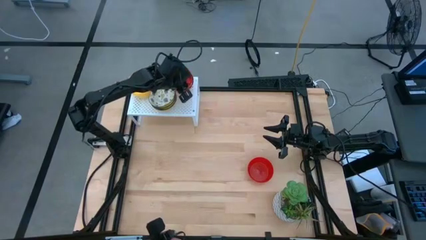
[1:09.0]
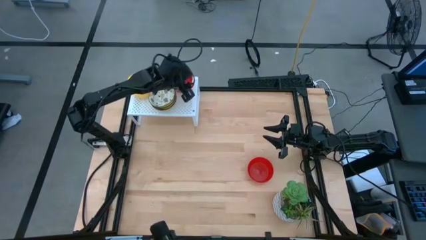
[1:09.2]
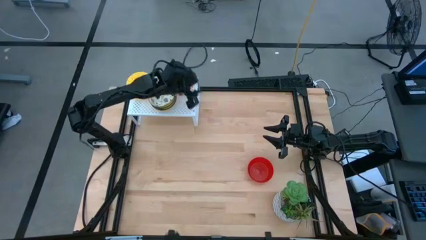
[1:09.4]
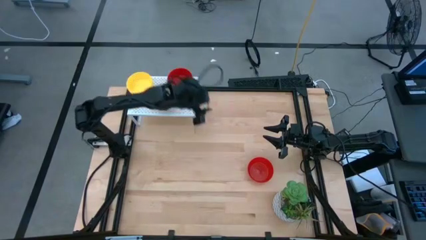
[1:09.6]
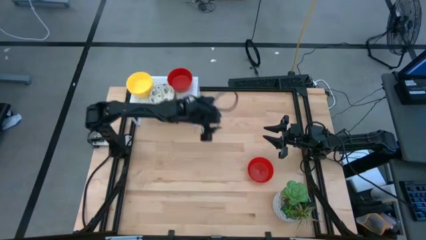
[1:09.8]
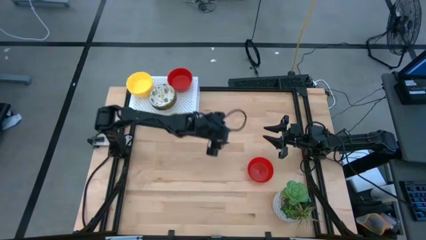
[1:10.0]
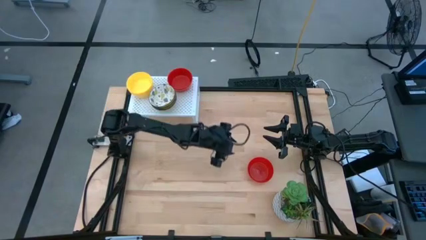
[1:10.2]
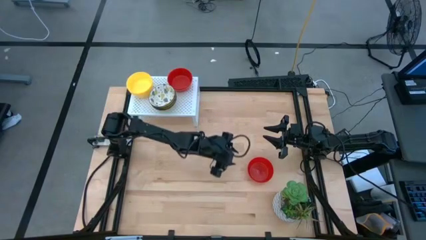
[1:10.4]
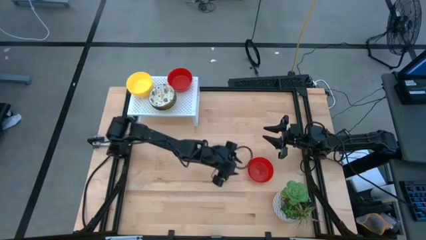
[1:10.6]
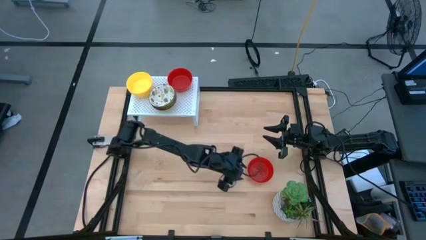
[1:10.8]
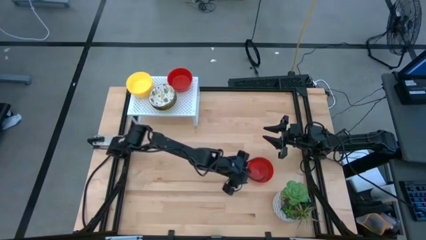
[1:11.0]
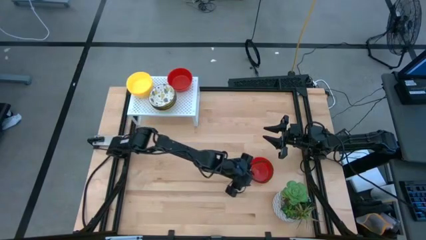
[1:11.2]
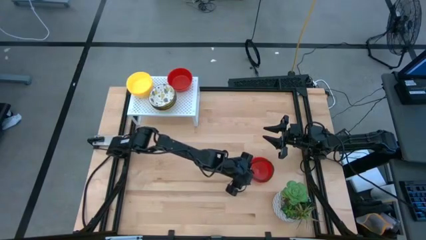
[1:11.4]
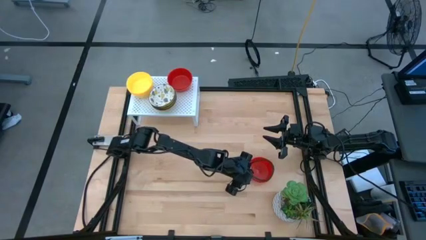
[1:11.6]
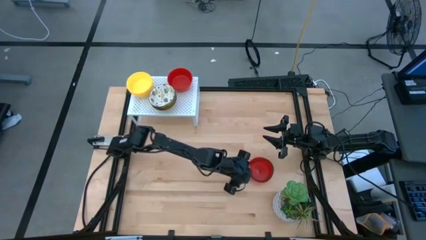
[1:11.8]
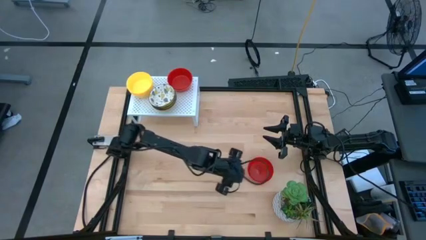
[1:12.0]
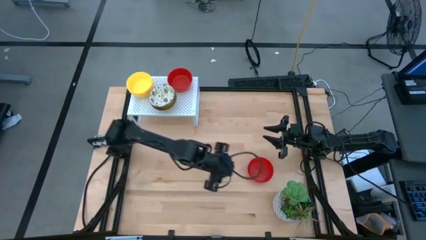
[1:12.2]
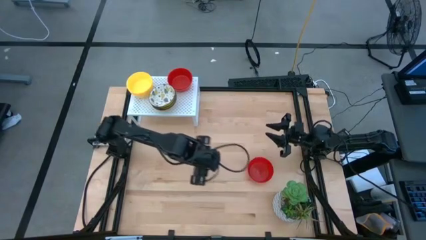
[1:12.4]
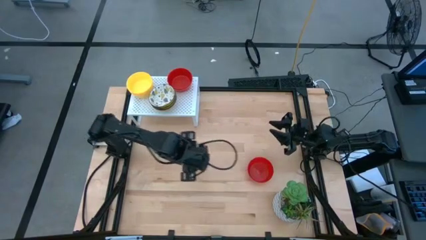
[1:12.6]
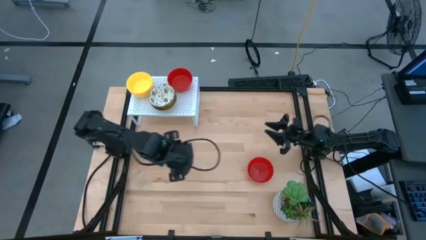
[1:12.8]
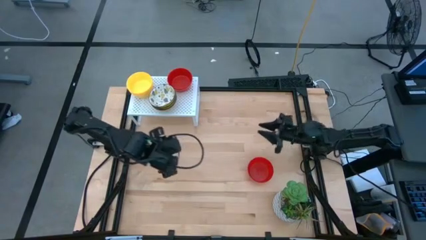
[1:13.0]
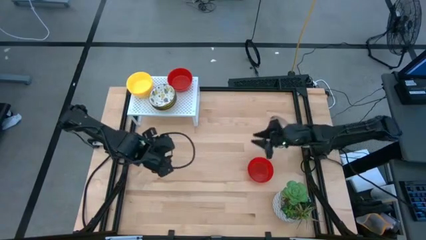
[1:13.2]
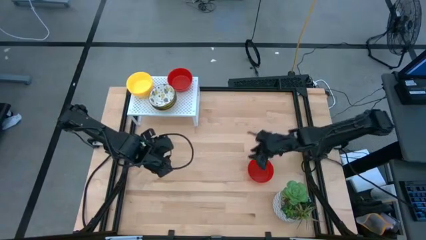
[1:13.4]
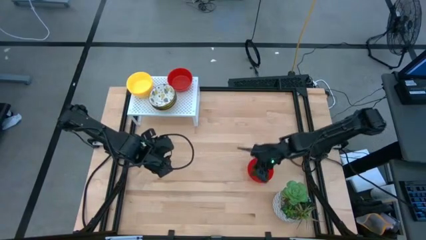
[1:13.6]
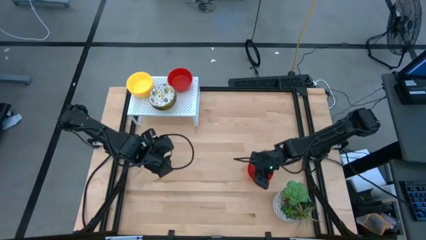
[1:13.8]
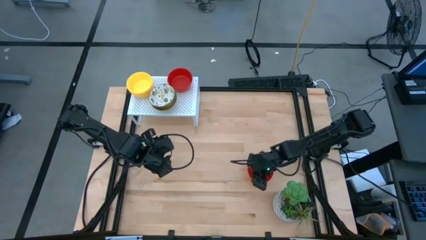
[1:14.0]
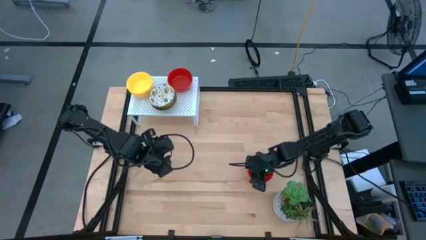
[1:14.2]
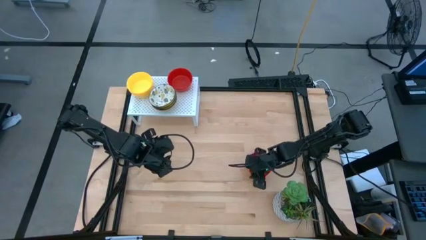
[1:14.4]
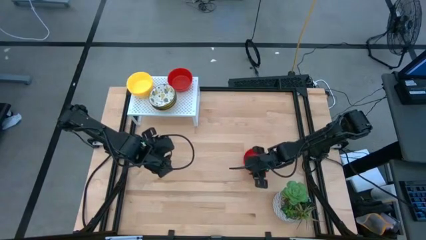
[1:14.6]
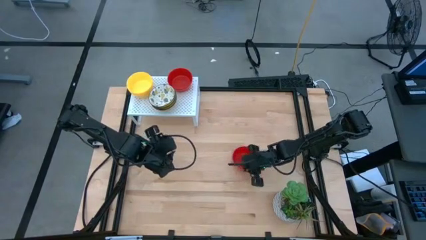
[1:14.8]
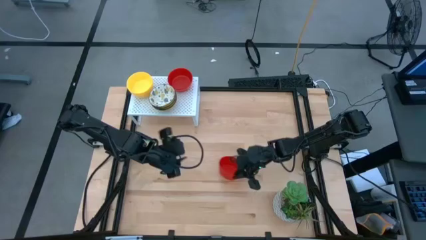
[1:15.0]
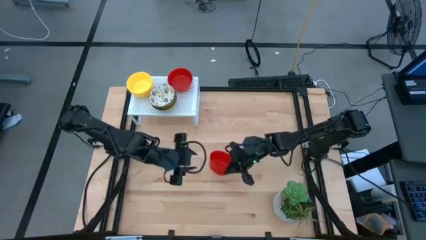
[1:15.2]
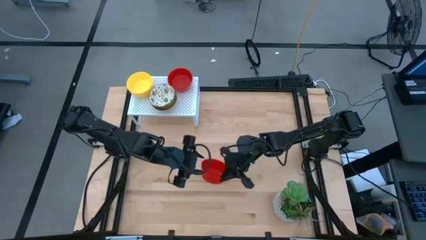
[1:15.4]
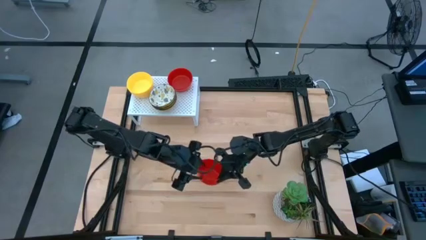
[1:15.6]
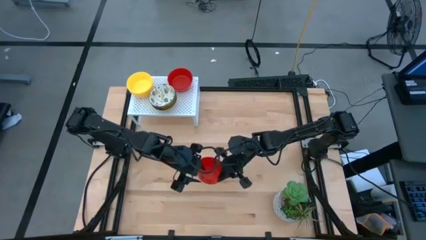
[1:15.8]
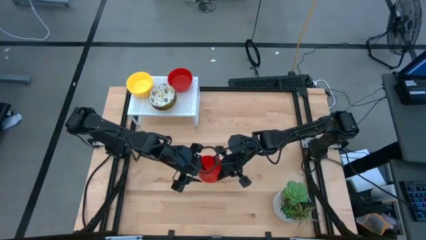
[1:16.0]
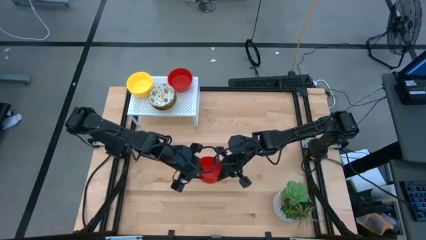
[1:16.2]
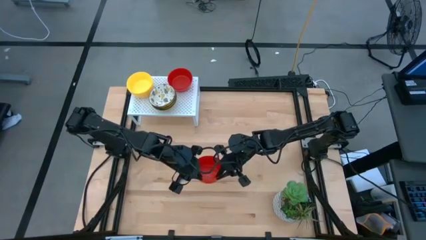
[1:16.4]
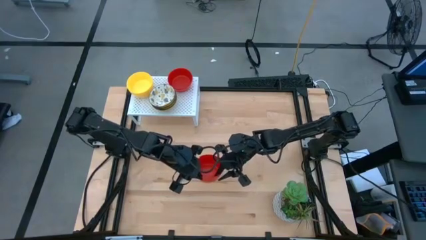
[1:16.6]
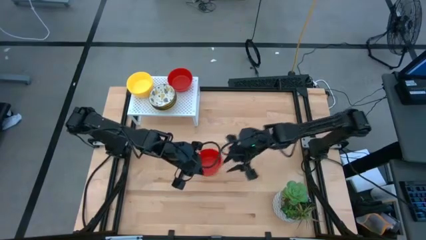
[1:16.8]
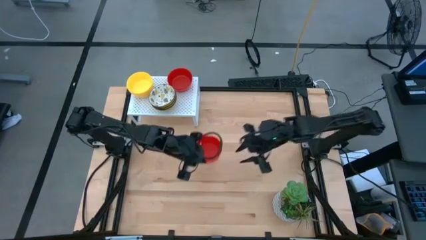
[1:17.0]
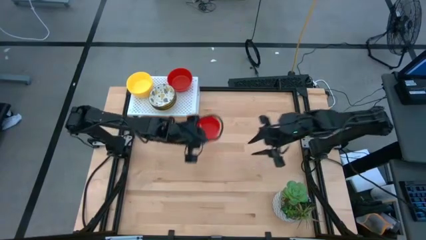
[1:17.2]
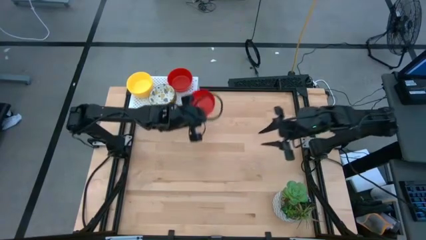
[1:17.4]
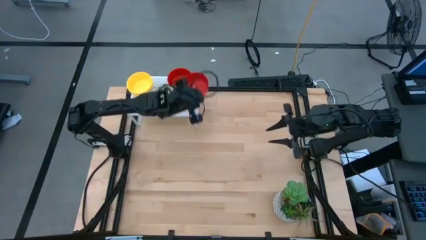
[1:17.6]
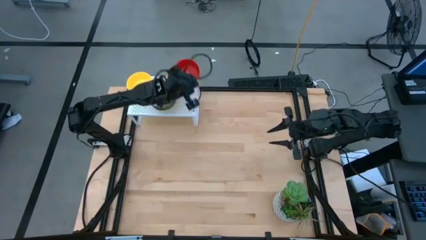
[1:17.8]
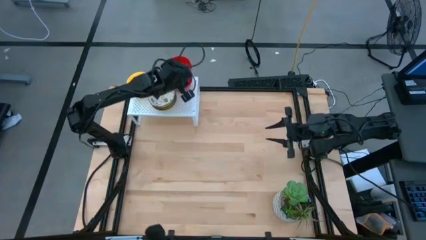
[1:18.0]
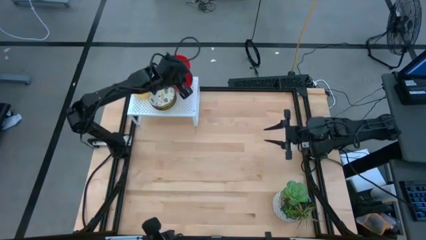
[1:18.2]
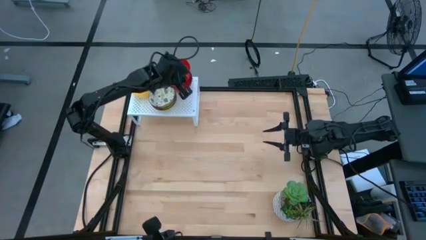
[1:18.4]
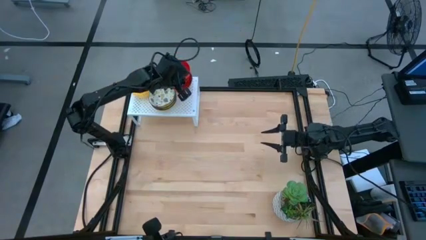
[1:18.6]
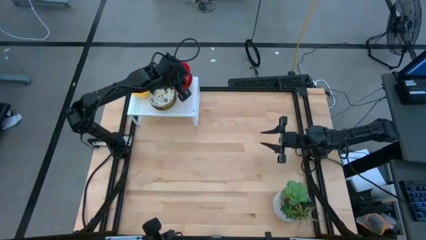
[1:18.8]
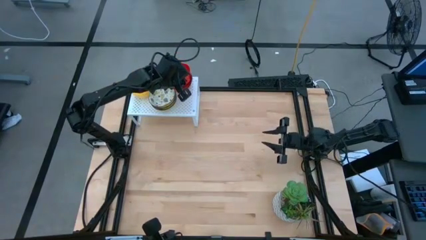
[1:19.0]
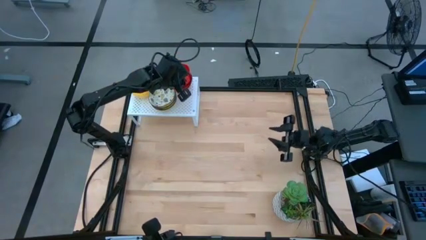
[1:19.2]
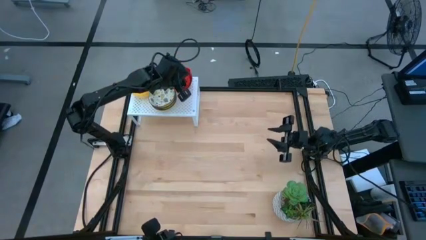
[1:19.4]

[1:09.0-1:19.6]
Task: Pick & Place Mini bowls
Stack the red bowl on top of the other red bowl on the shelf

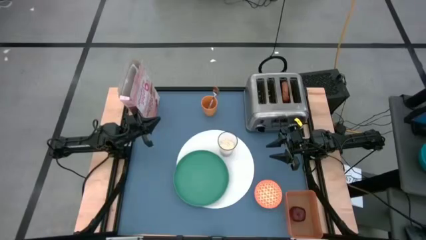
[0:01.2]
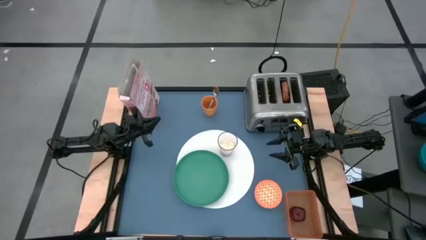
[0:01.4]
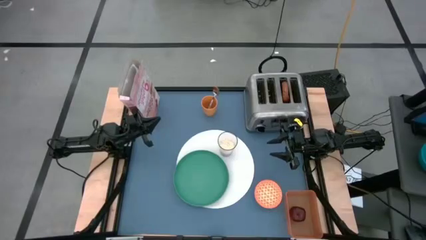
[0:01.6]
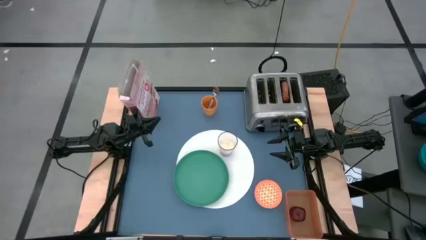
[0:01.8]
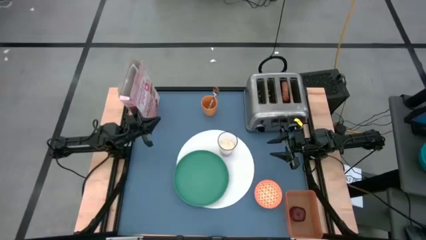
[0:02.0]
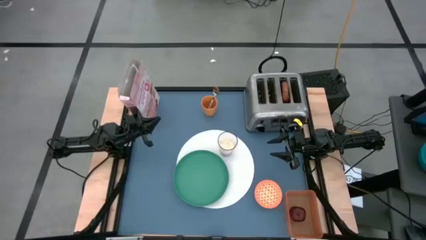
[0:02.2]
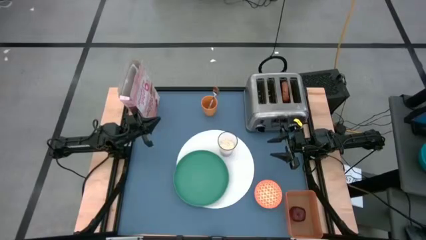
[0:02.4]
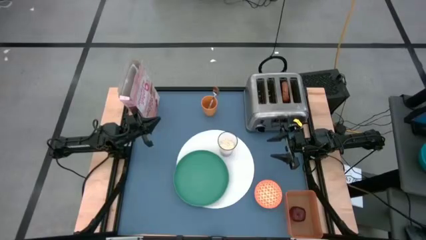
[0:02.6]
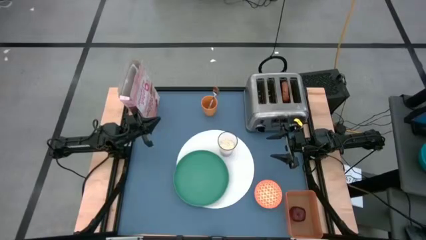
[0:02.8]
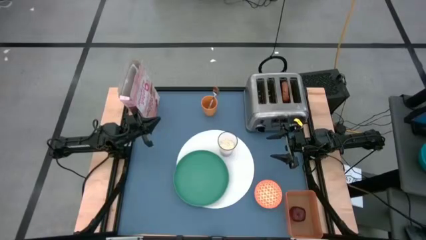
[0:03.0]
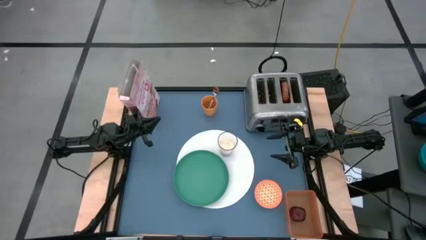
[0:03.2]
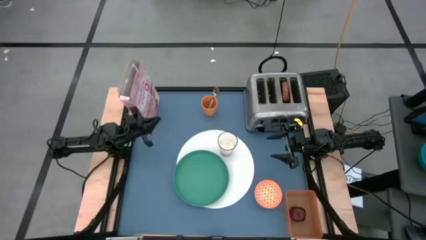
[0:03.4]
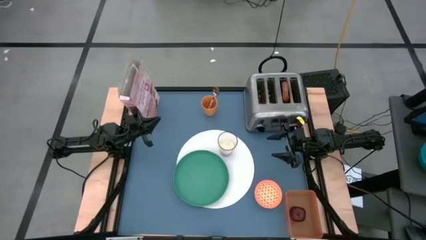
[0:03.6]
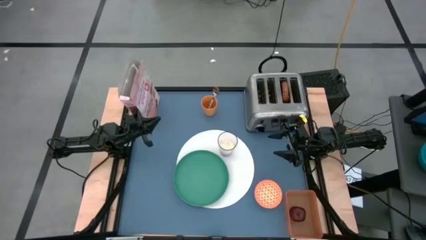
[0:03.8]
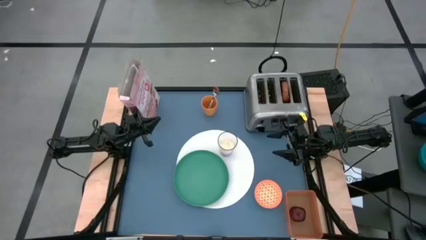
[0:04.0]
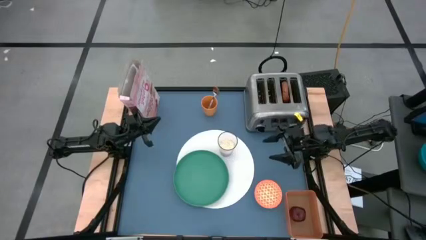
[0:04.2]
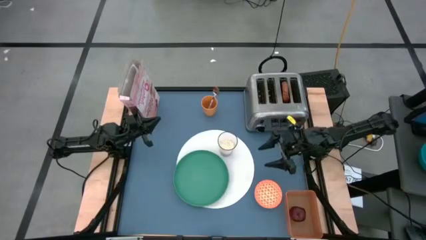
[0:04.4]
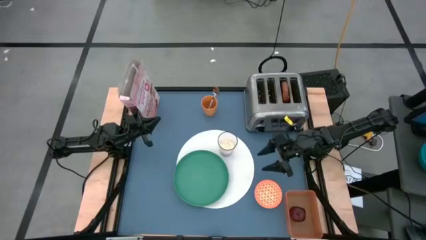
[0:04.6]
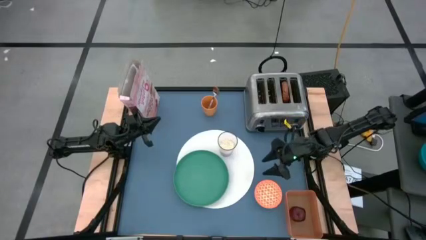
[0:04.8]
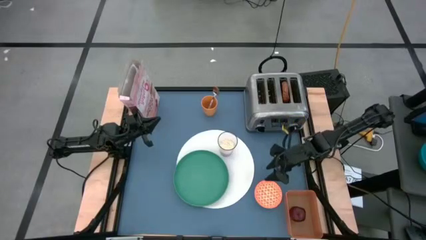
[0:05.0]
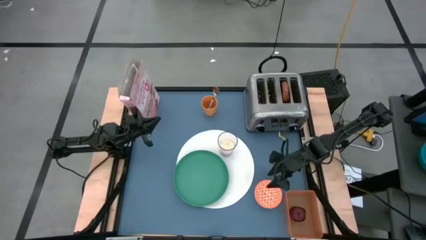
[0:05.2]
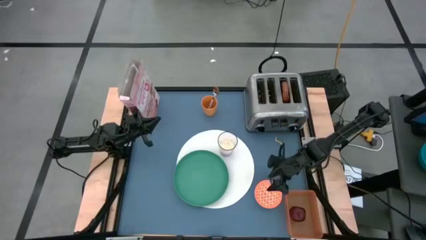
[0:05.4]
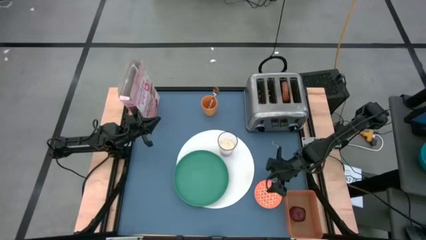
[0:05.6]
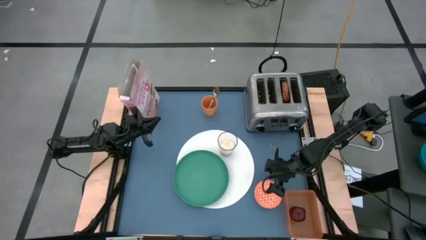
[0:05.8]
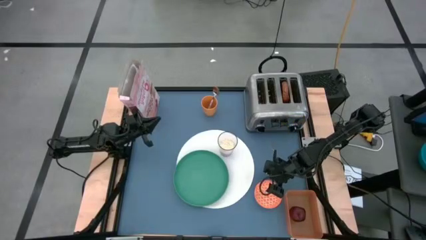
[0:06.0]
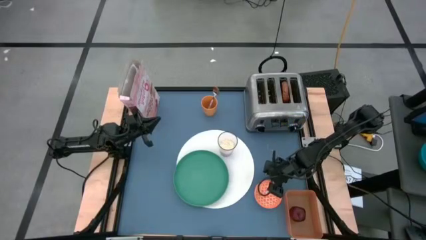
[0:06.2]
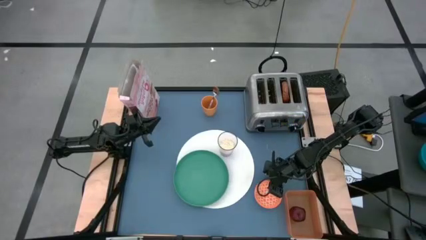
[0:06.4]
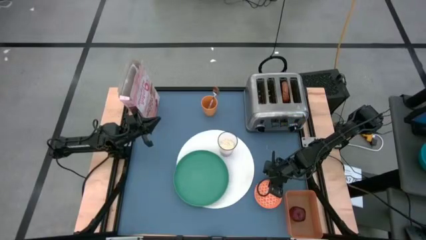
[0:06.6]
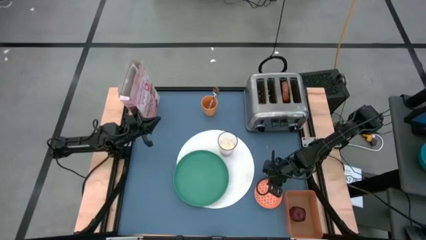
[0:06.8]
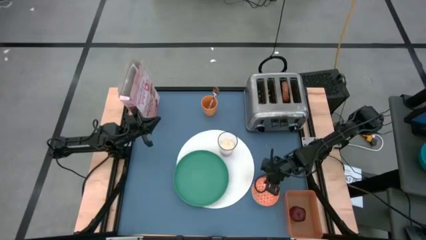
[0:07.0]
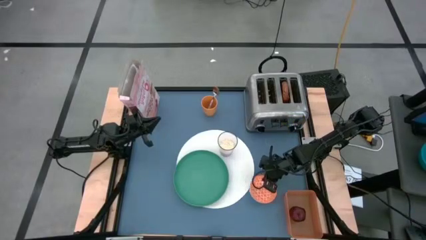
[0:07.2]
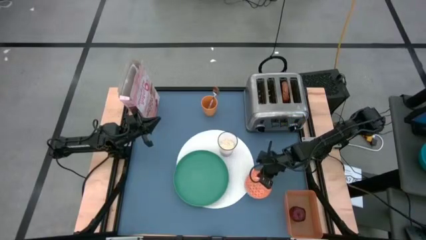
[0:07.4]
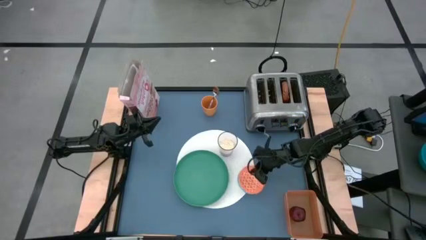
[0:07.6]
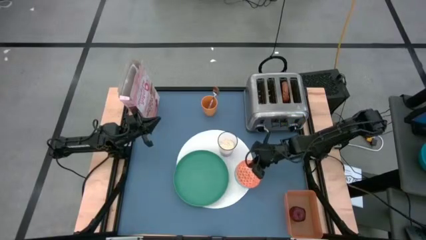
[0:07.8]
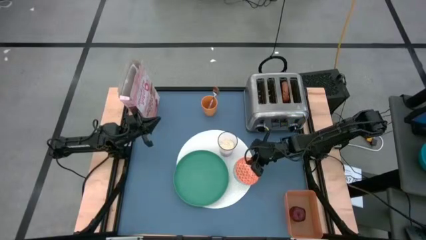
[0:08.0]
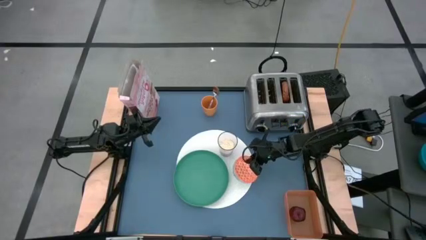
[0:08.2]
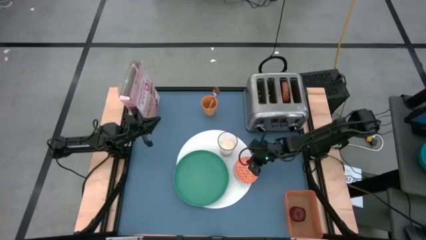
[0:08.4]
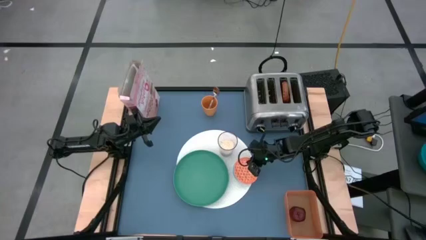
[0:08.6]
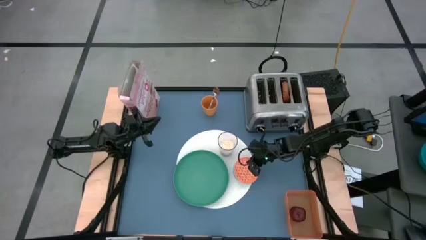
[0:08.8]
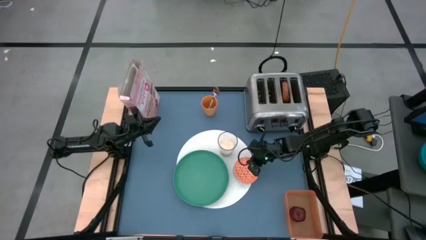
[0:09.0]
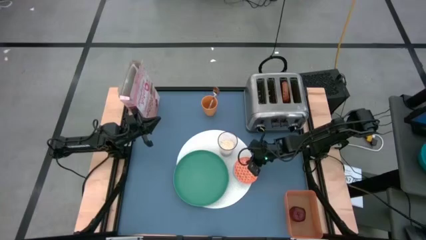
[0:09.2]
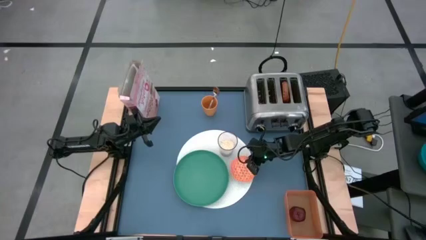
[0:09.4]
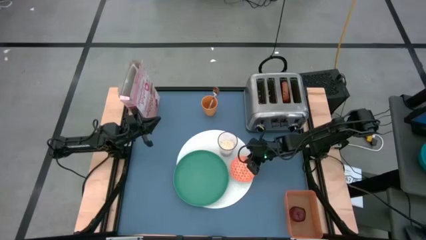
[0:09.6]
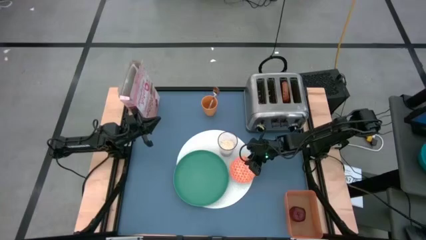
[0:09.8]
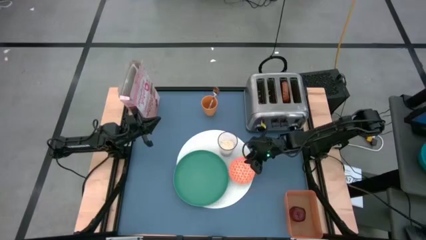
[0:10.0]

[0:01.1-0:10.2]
Task: Arrange a breakfast setting
Put the orange bowl on the white placemat to the right of the green plate
